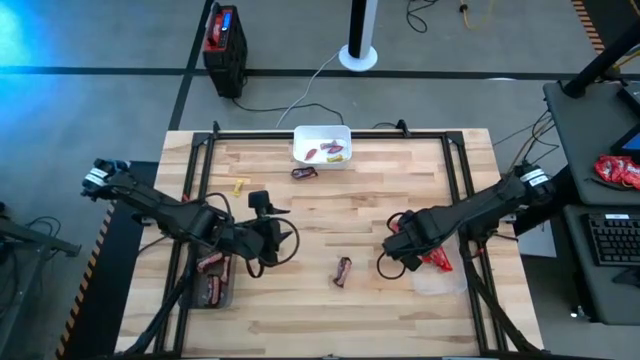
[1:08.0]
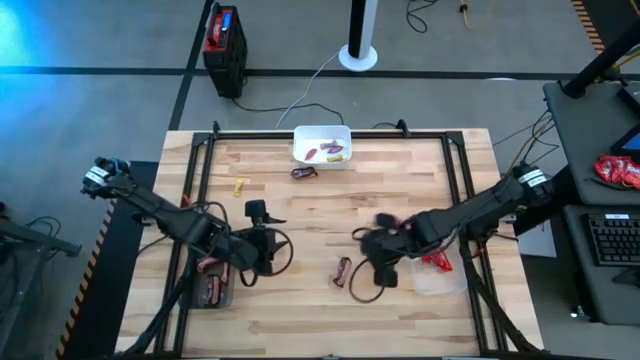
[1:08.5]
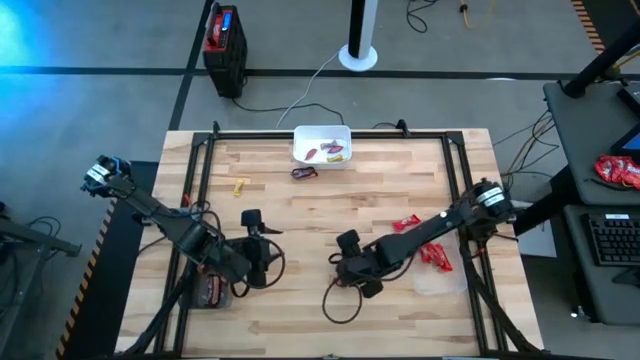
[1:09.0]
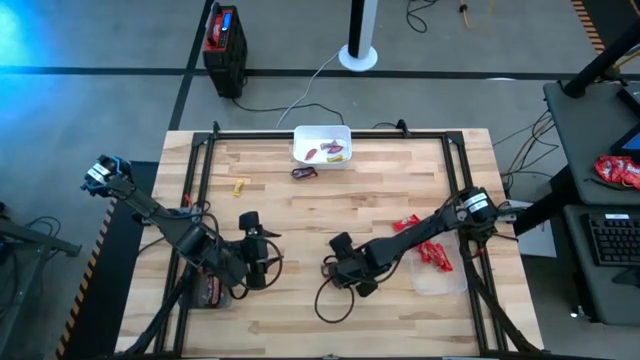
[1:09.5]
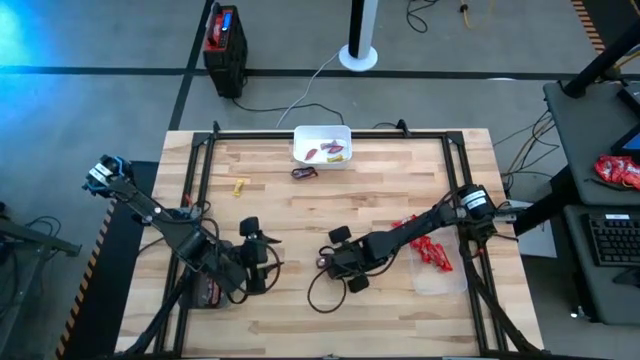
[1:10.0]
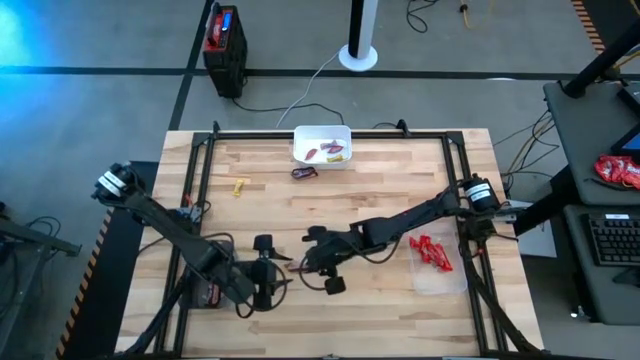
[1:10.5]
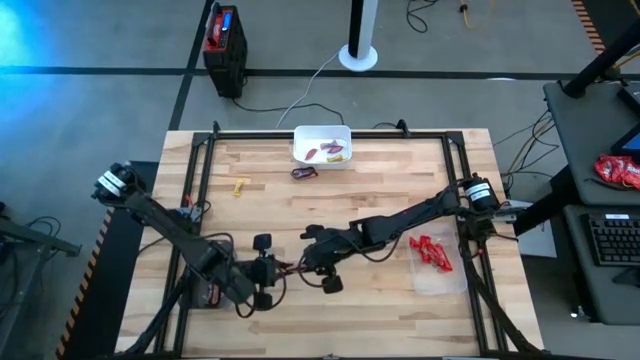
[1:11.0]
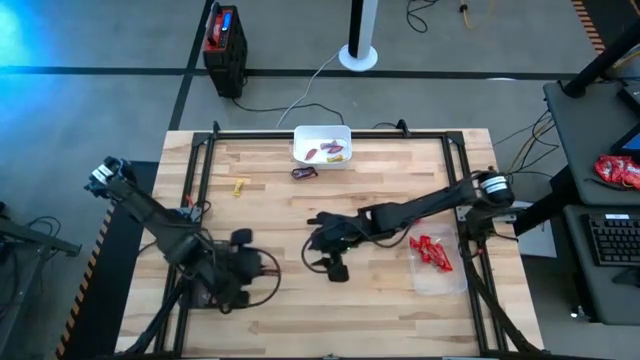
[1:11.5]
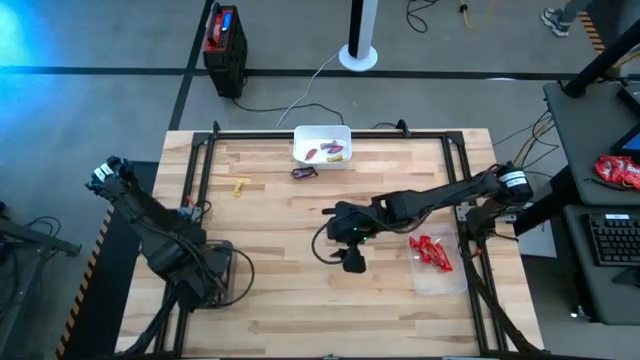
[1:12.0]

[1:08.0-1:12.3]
Task: Sort candy by brand, put in halloween buckets
Put the brown chocolate bar into the black bin

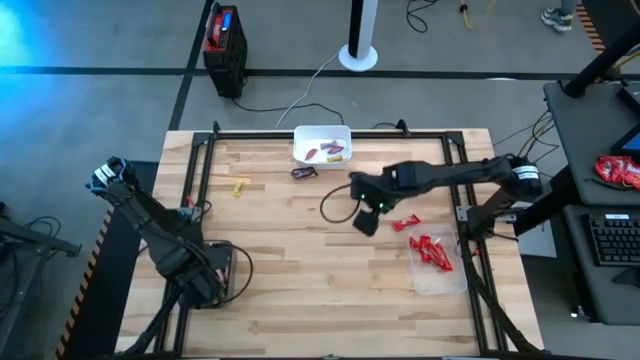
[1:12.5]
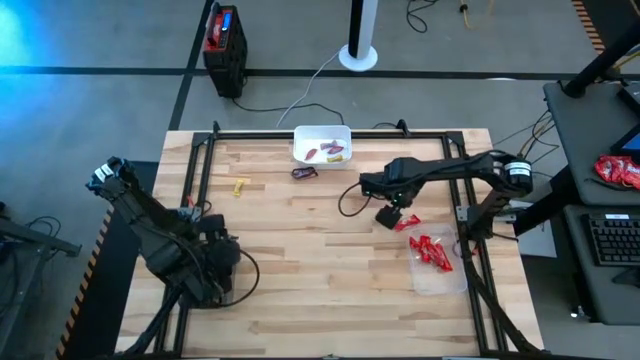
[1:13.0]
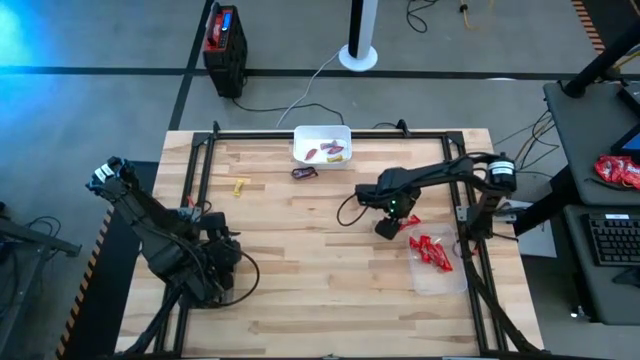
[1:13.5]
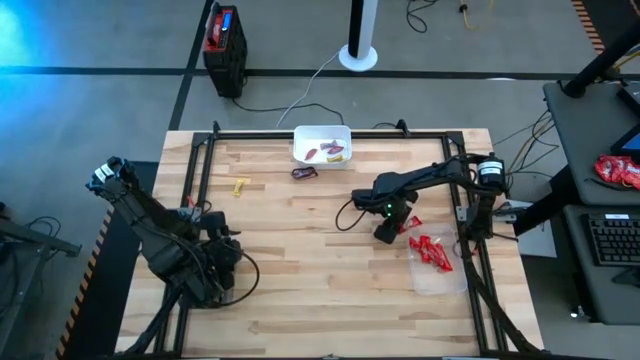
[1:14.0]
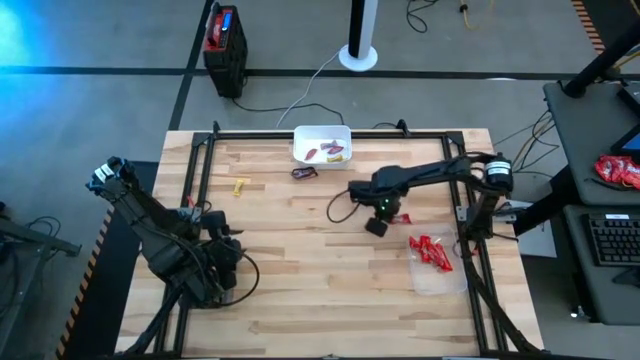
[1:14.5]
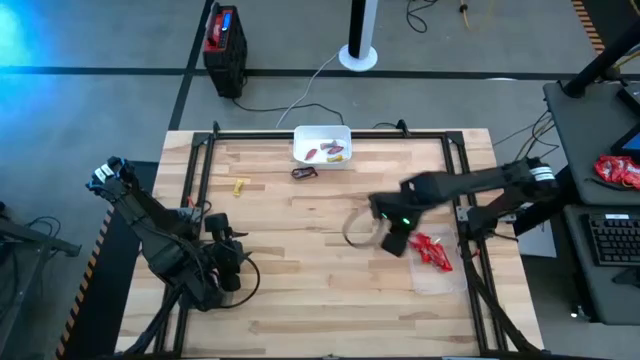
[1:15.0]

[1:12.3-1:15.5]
Put the red chocolate bar into the transparent bin

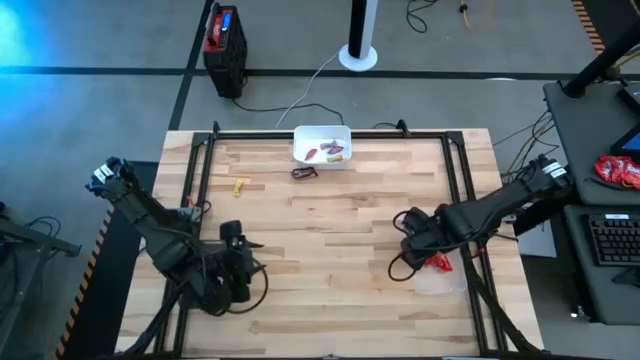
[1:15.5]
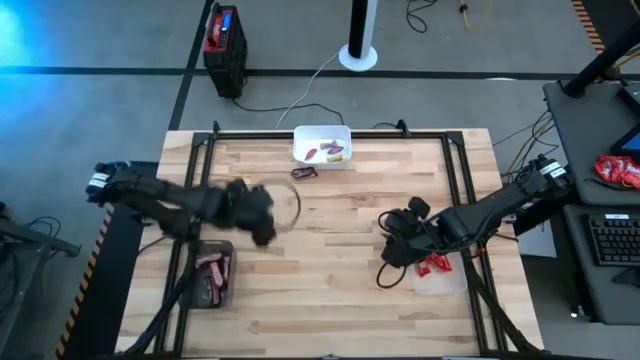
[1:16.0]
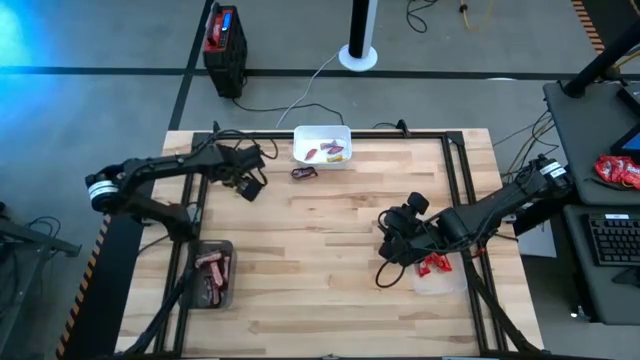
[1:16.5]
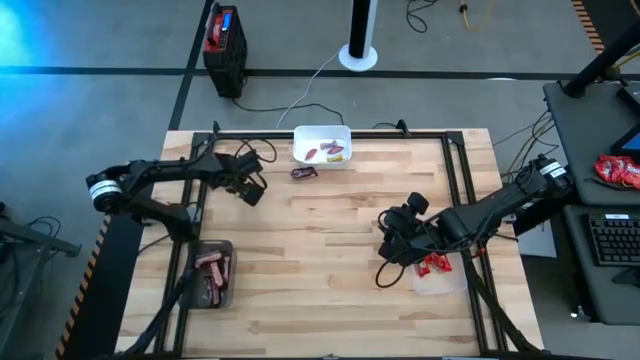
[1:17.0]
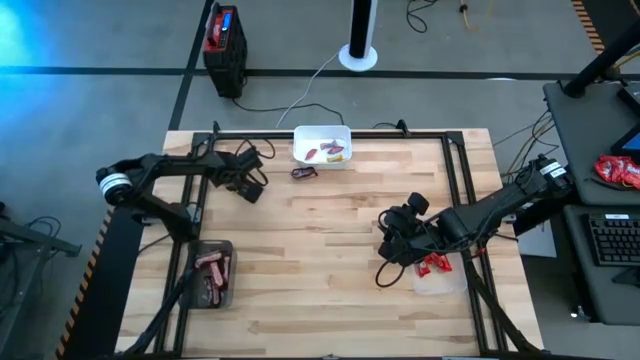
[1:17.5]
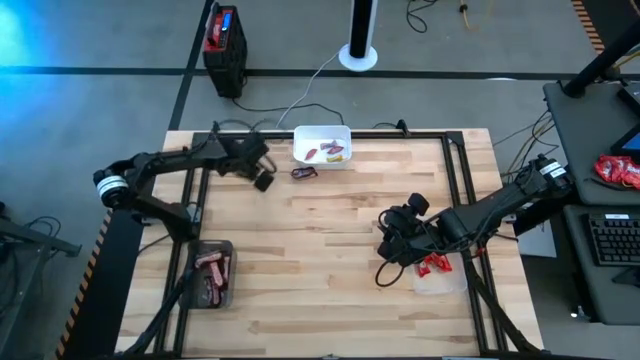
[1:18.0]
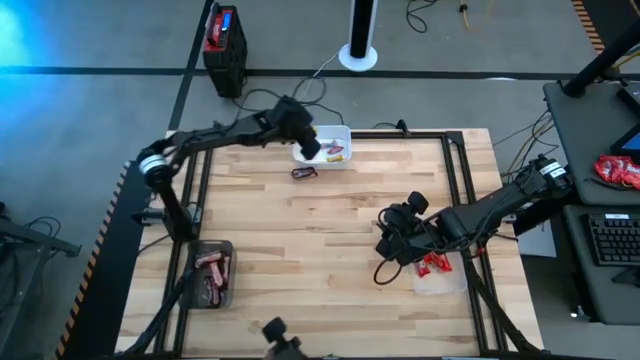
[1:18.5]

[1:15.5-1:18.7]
Put the yellow candy into the white bin

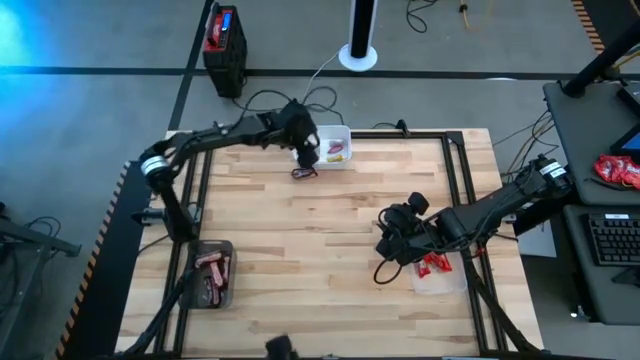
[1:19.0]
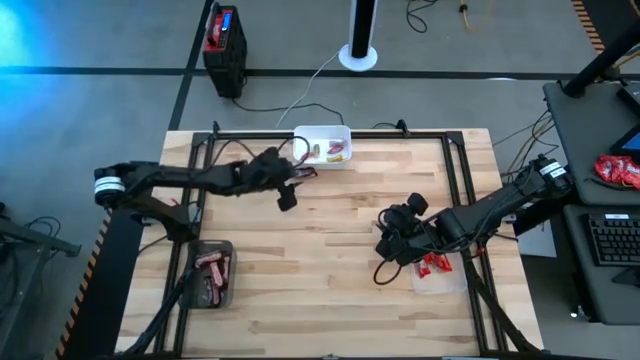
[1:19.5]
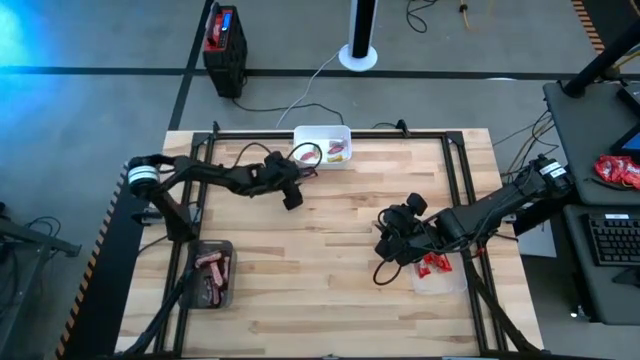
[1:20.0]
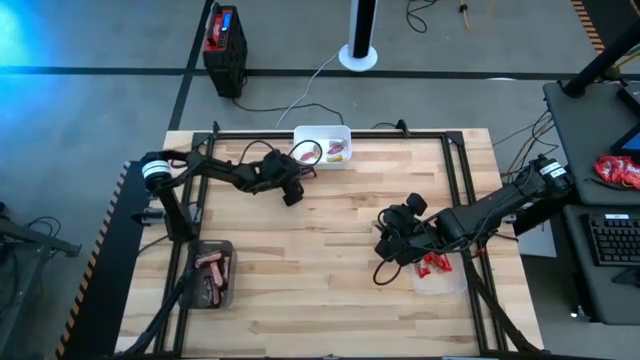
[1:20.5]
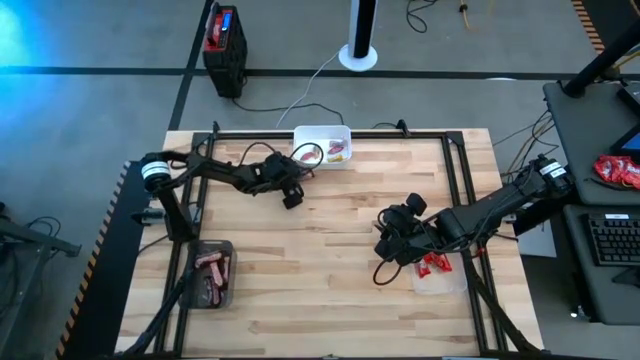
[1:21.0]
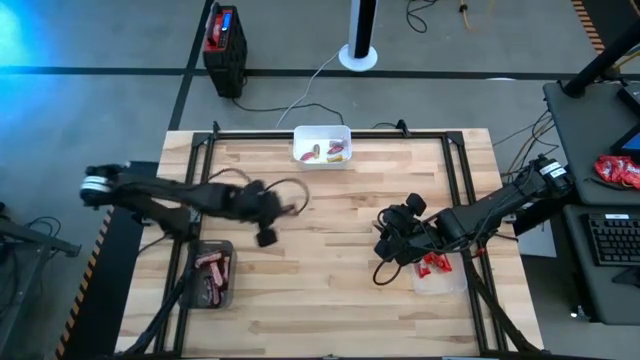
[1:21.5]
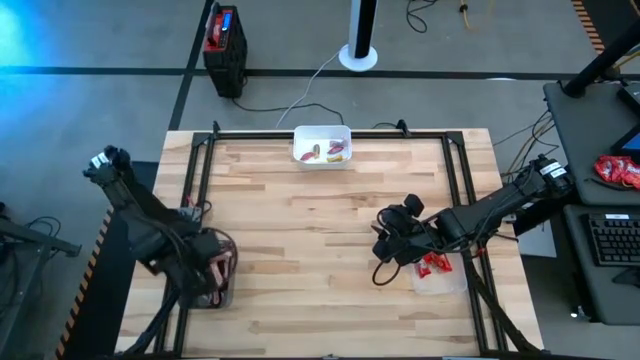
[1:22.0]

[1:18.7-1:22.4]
Put the brown chocolate bar into the black bin

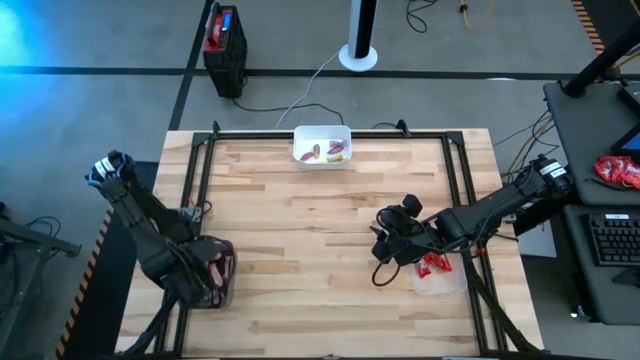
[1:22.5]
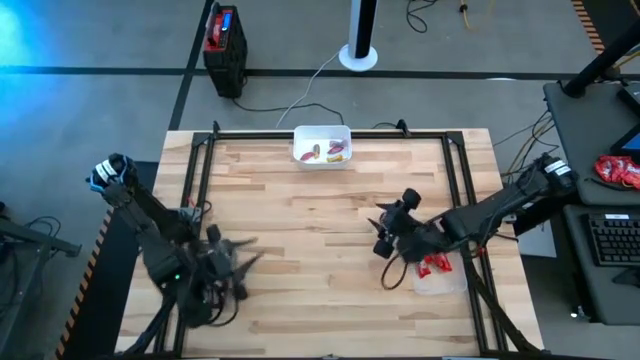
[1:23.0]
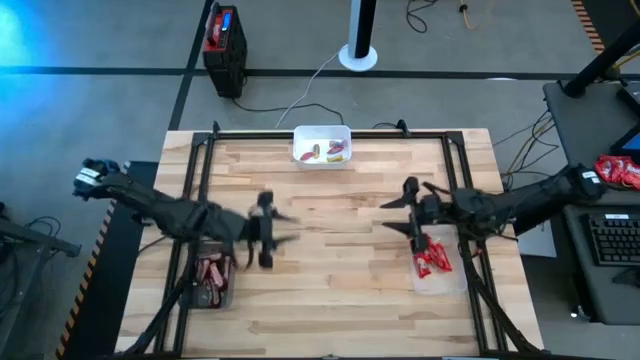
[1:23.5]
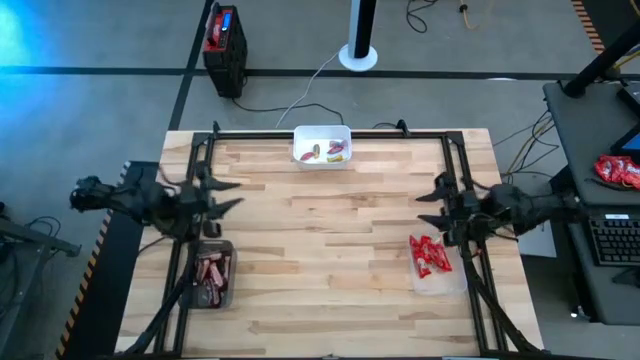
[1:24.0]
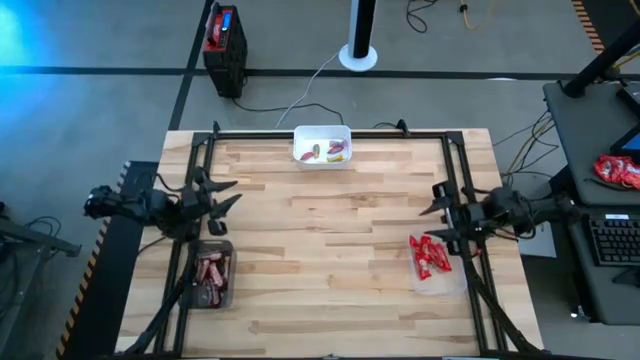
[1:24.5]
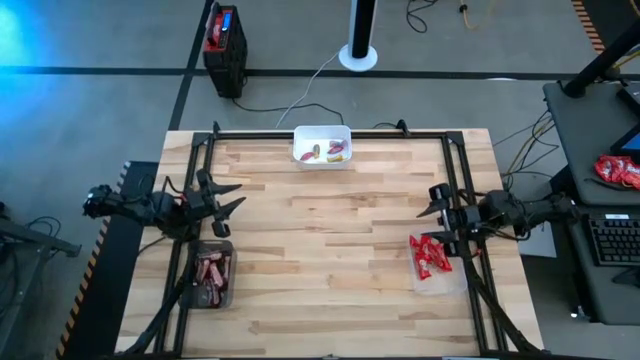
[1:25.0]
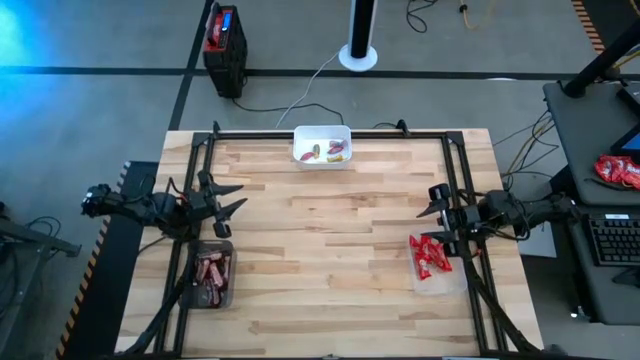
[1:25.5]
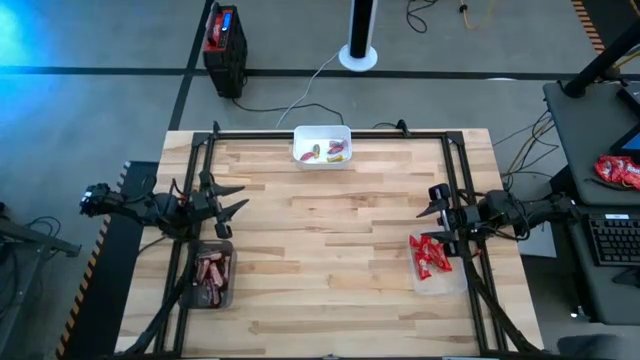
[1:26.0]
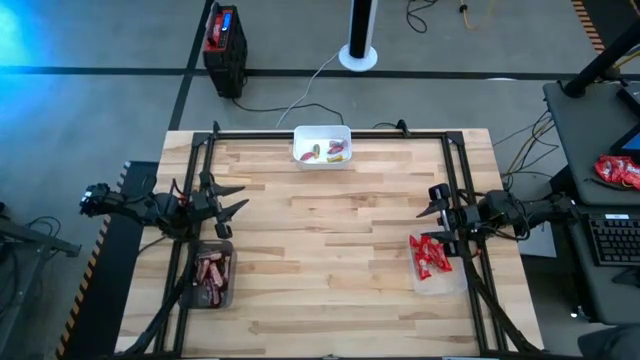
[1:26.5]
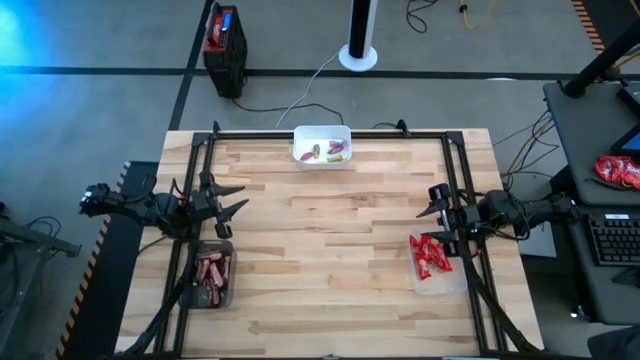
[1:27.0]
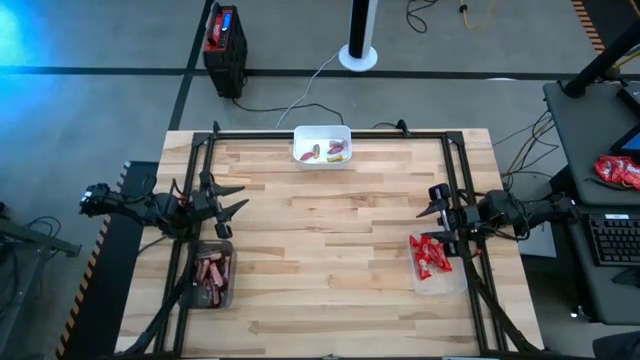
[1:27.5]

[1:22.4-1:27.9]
Return to Home Position
